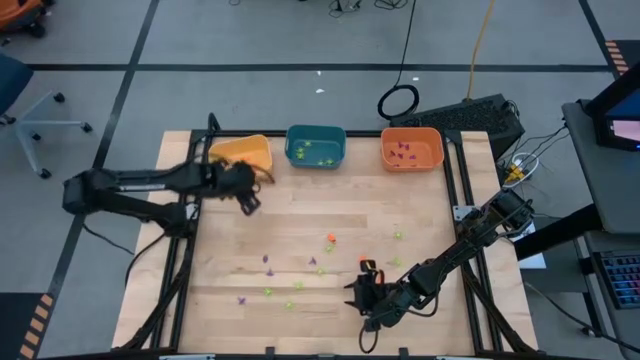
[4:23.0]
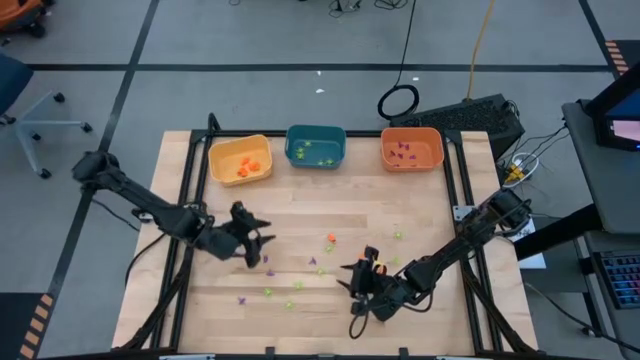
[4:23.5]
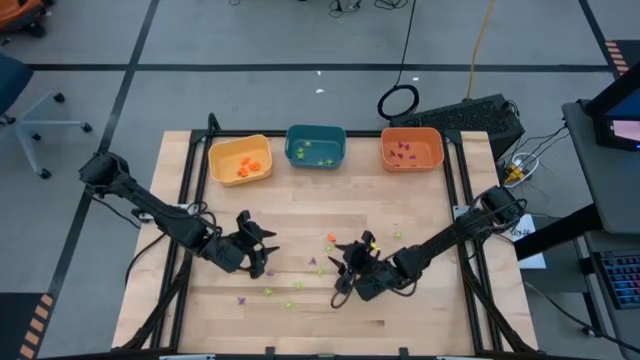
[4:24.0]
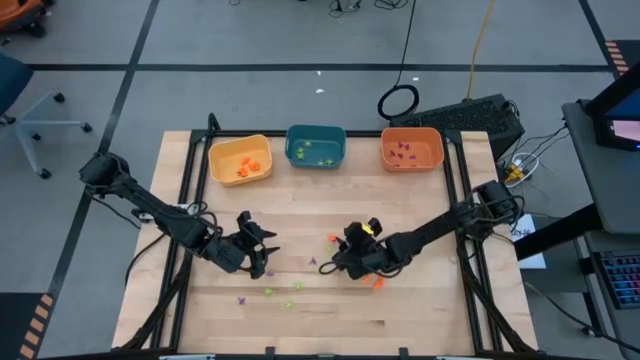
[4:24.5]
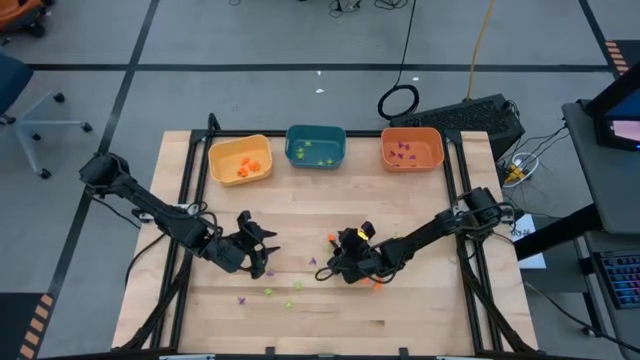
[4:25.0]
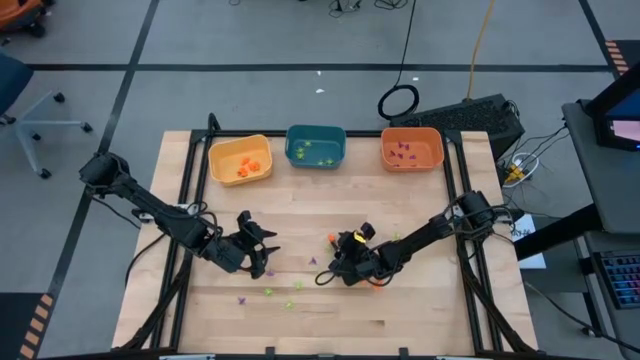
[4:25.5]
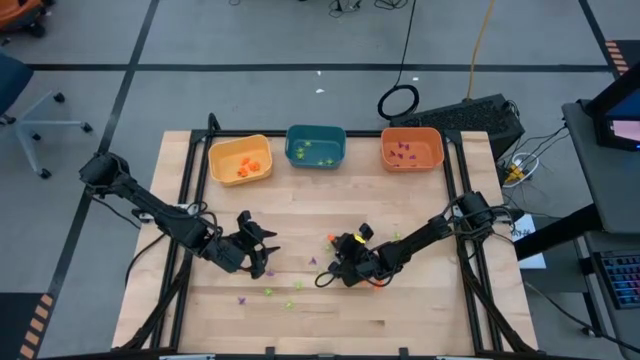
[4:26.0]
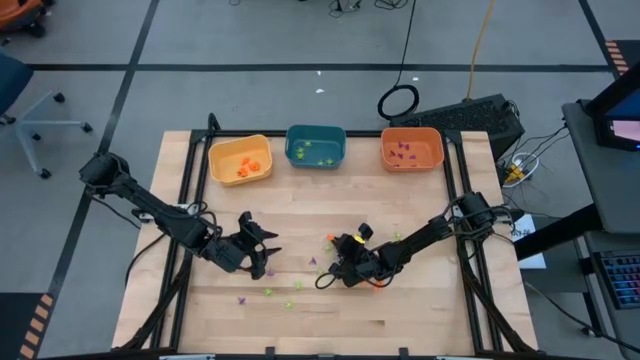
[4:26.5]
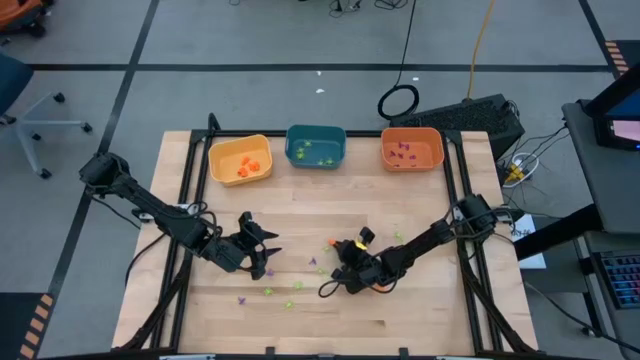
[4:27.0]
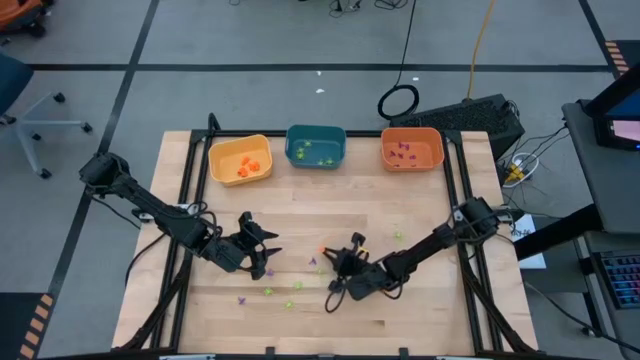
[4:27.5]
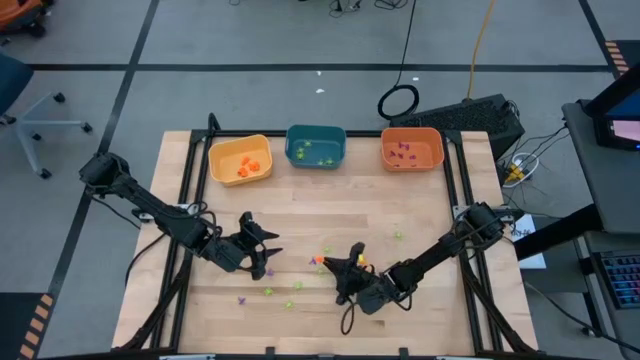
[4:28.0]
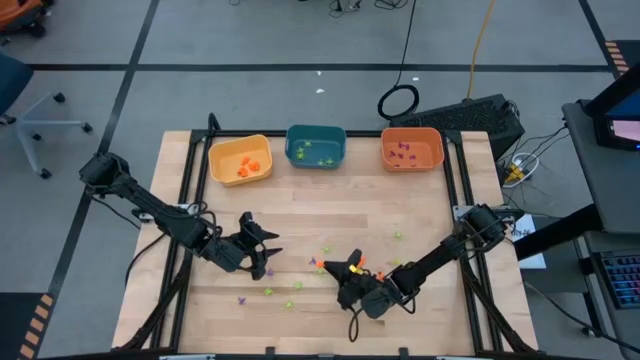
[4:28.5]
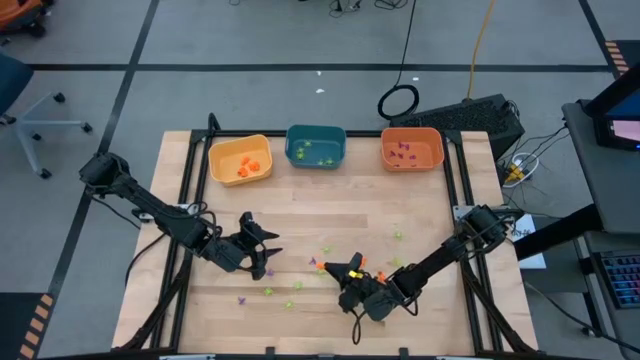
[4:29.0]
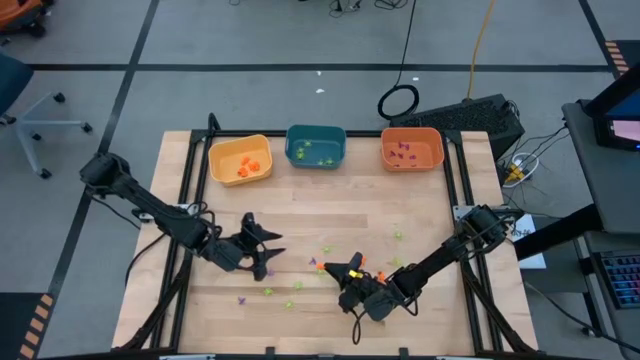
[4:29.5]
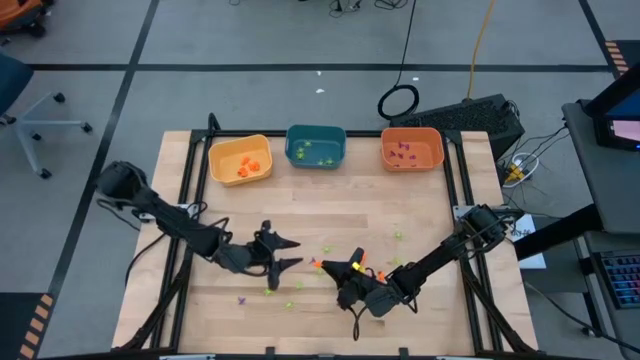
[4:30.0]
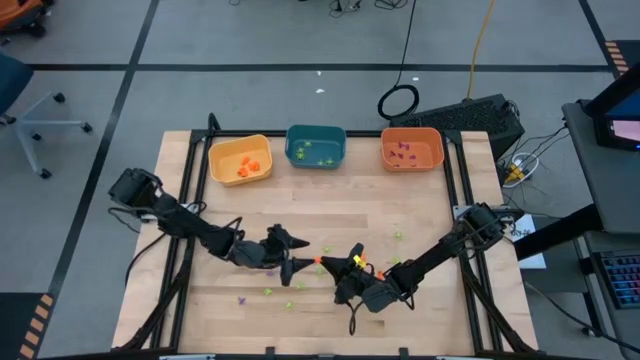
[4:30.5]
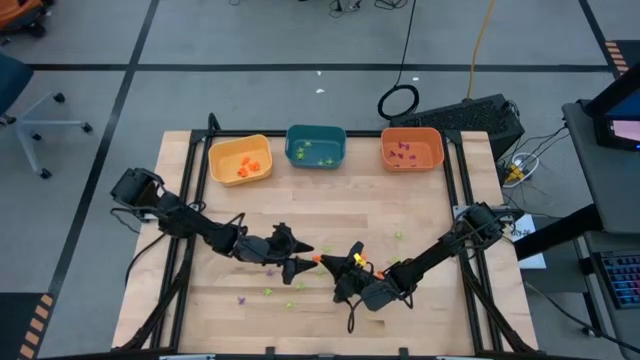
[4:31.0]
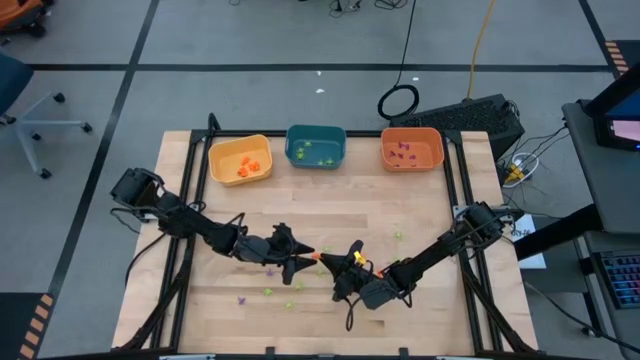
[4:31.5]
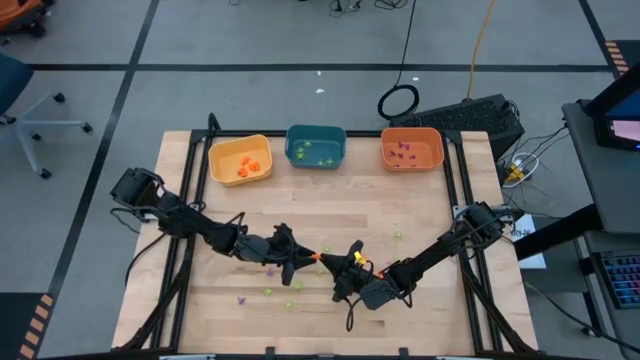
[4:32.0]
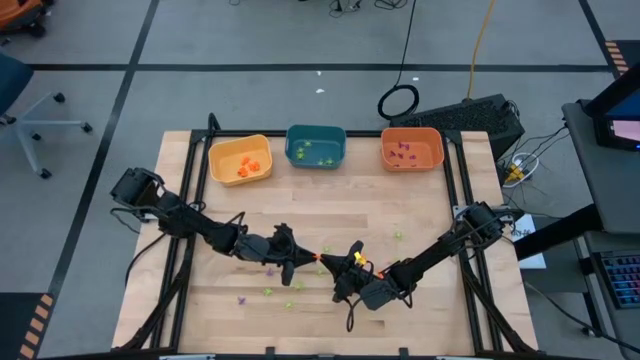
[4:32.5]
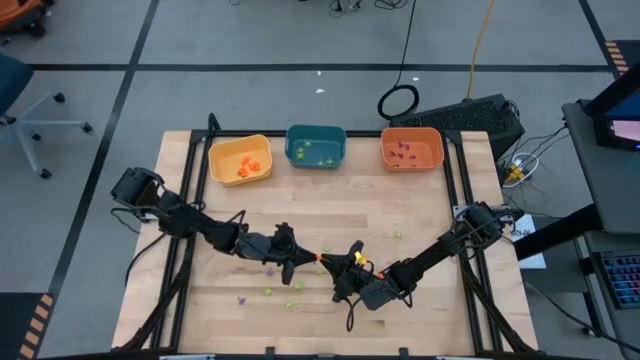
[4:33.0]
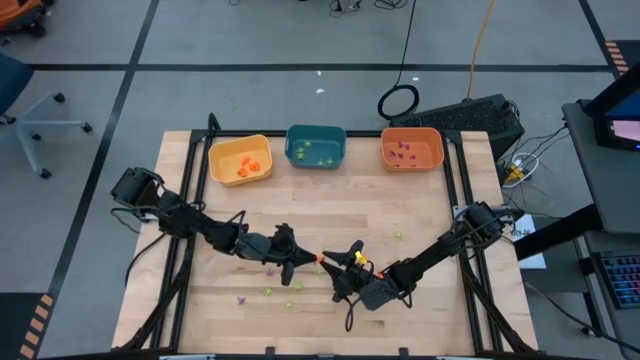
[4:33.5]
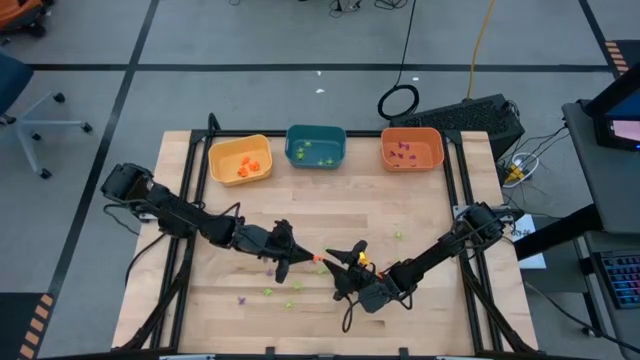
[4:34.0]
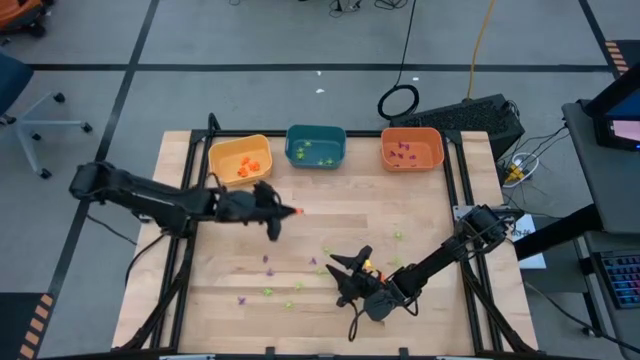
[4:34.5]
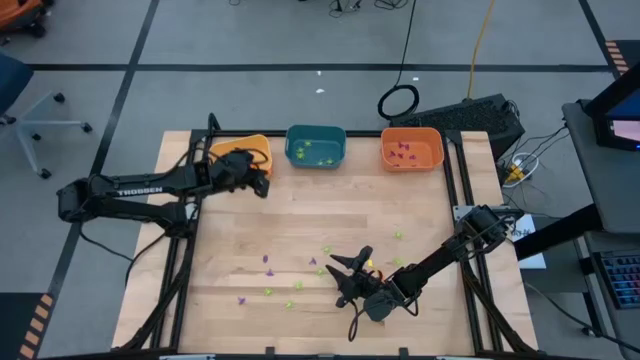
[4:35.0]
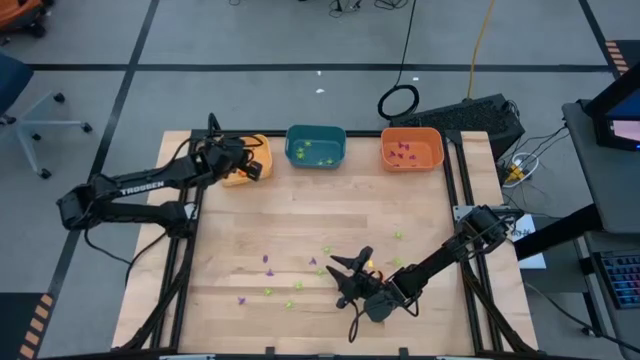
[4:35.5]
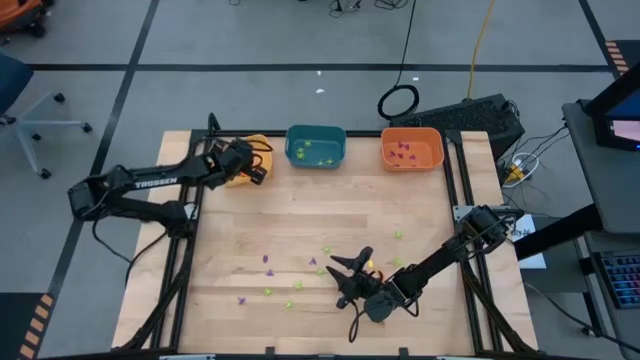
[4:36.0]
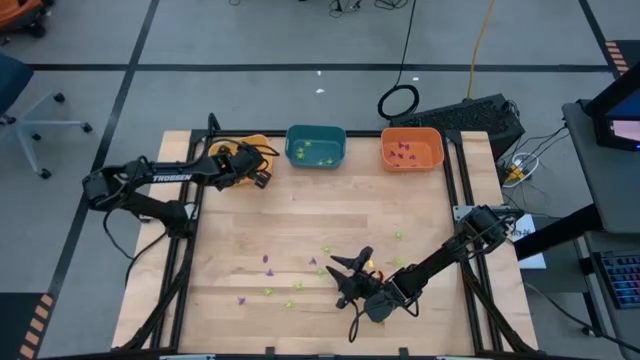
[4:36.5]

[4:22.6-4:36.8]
Task: Sort Halloween decoration
Put the orange skeleton toy into the yellow bin

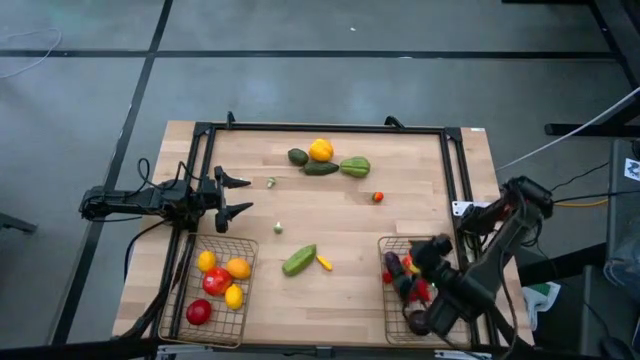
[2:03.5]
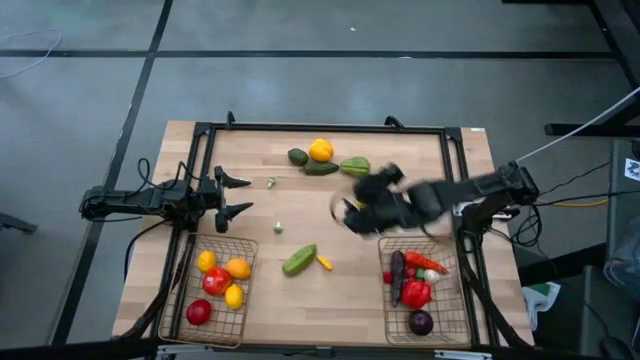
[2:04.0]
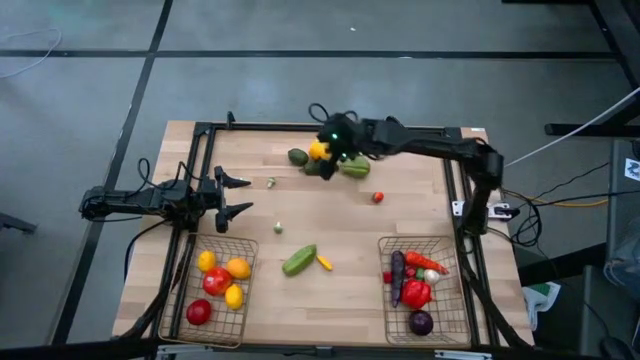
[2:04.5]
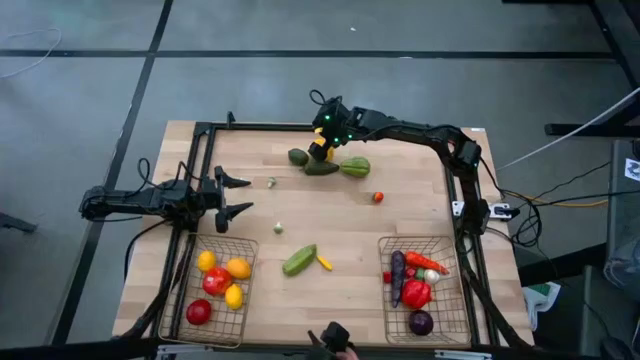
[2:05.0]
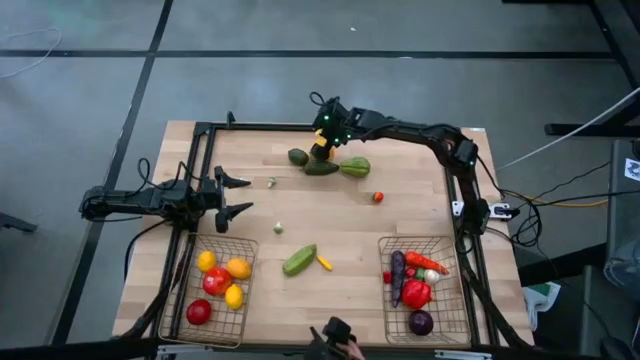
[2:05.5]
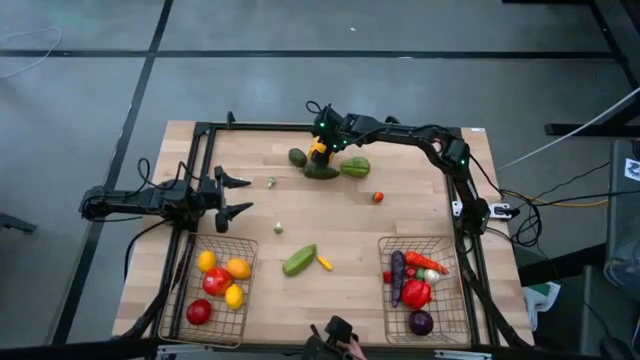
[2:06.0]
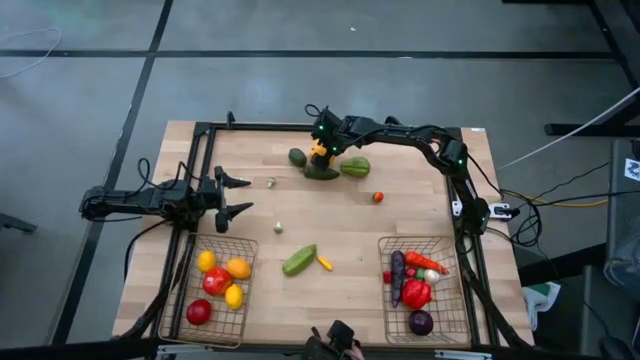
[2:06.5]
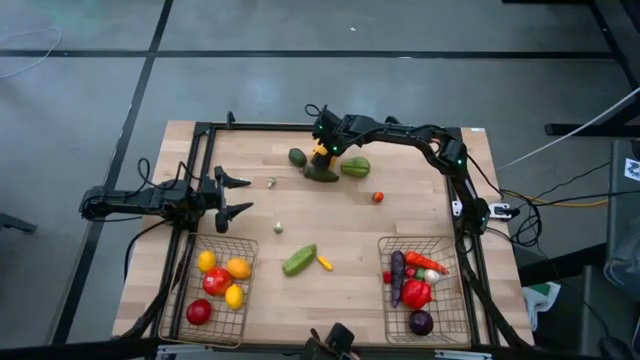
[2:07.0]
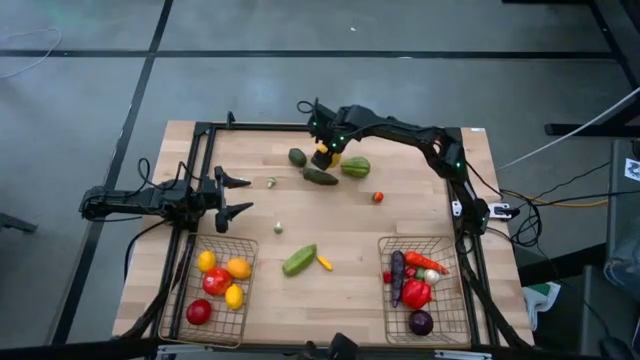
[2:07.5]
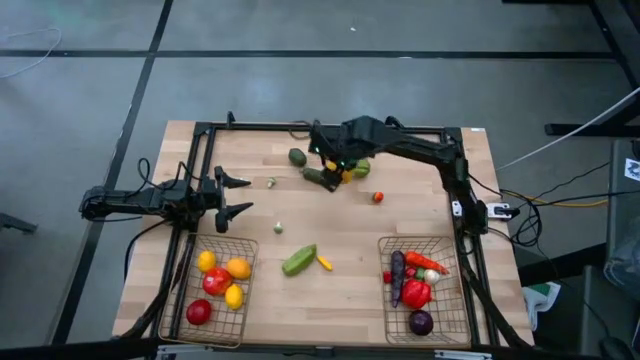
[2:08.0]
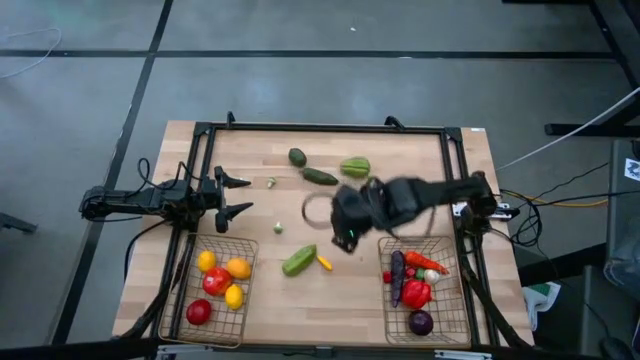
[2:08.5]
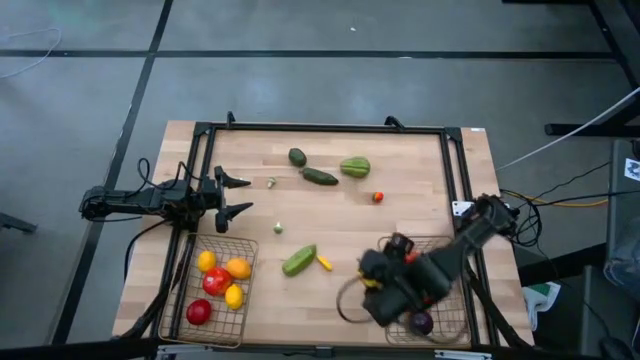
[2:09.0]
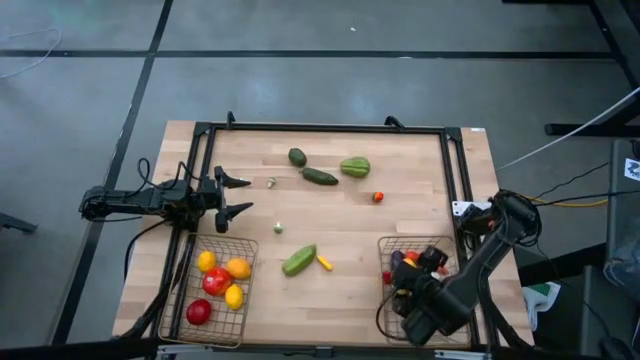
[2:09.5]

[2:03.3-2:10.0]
Task: Sort produce into baskets
Put the yellow bell pepper into right wire basket
